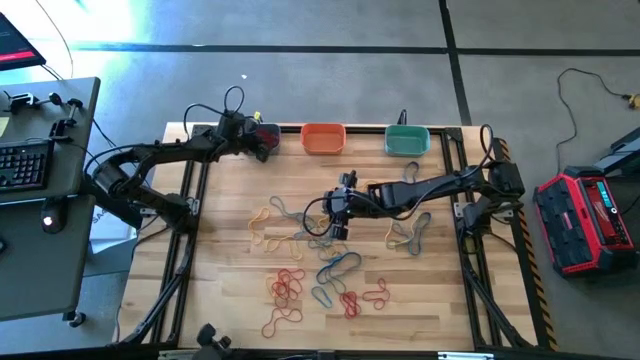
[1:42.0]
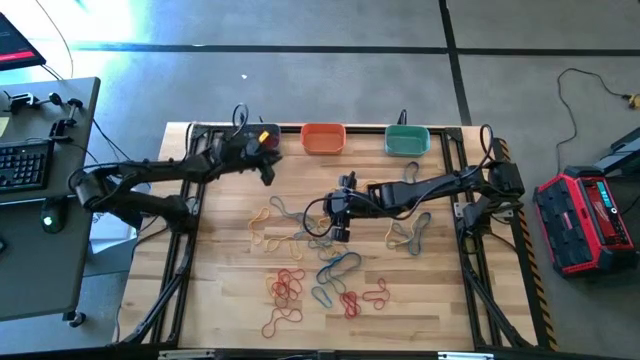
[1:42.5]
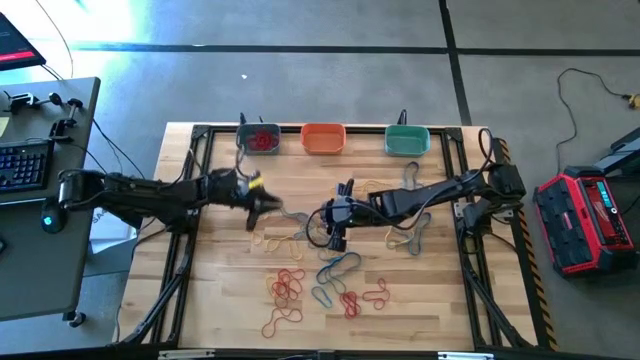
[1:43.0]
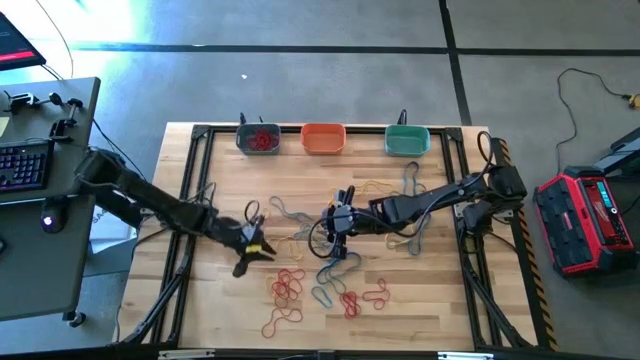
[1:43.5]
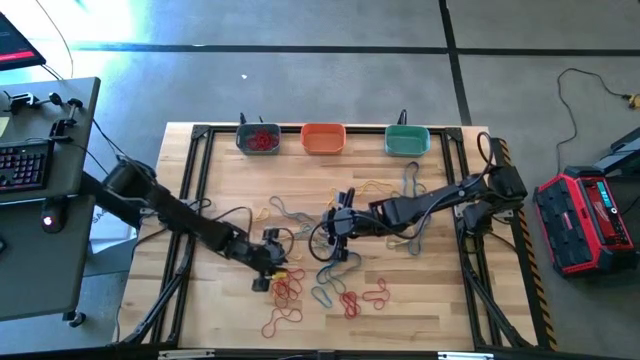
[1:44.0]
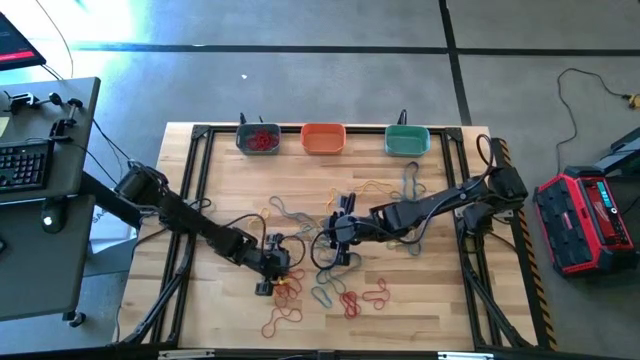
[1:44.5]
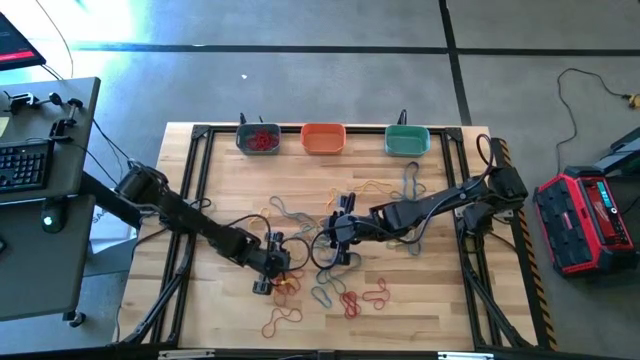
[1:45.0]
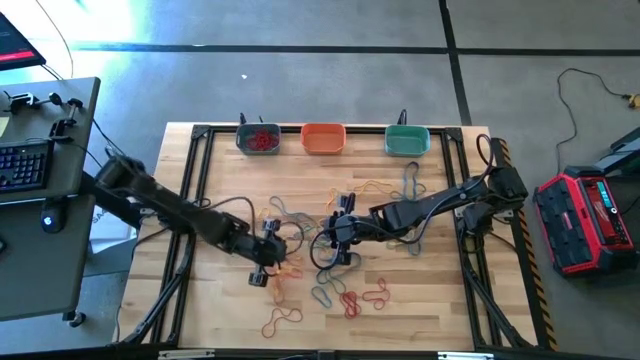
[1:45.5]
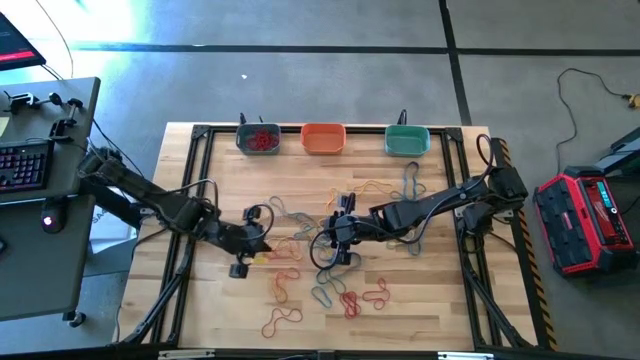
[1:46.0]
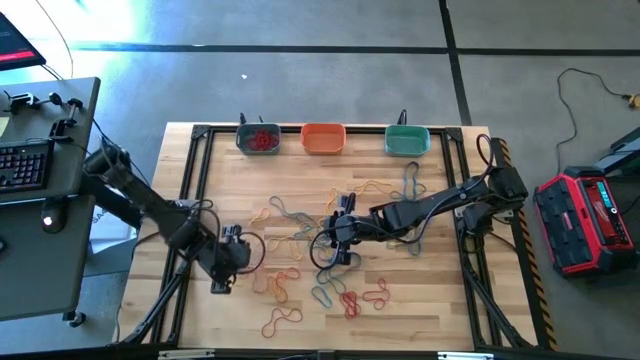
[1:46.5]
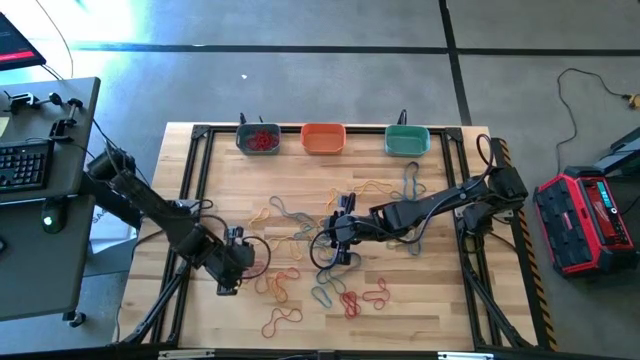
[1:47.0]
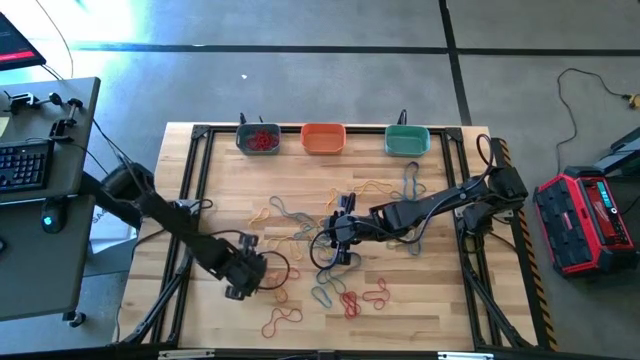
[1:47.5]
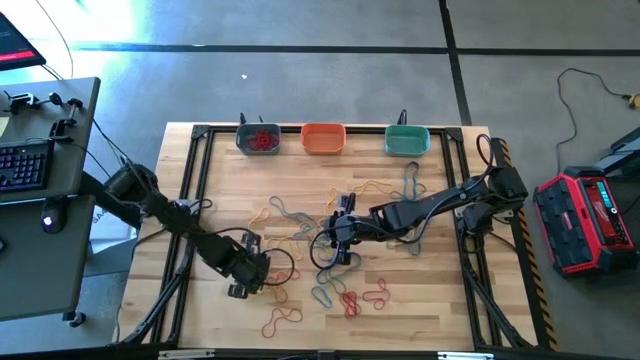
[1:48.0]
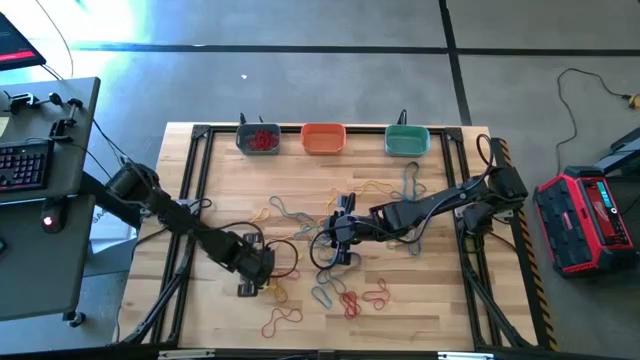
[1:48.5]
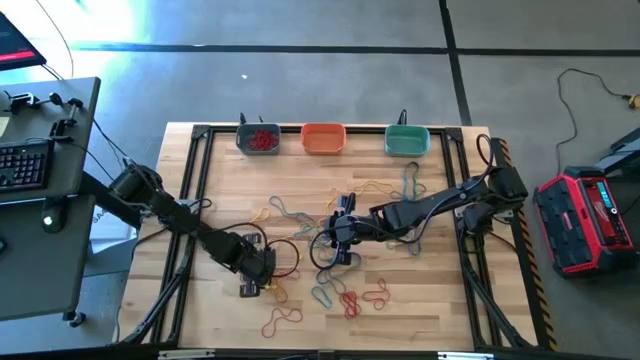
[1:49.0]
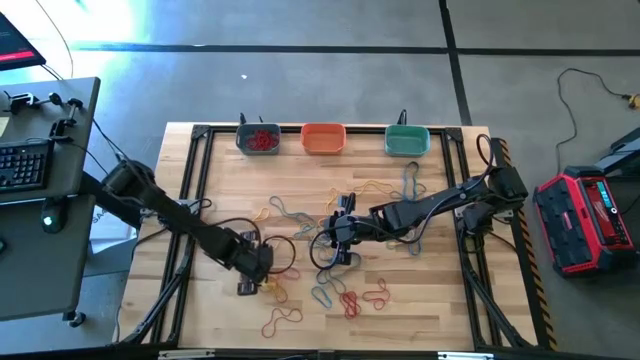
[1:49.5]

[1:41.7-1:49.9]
Task: Sort rubber bands into baskets
Put the red rubber band into the blue bin

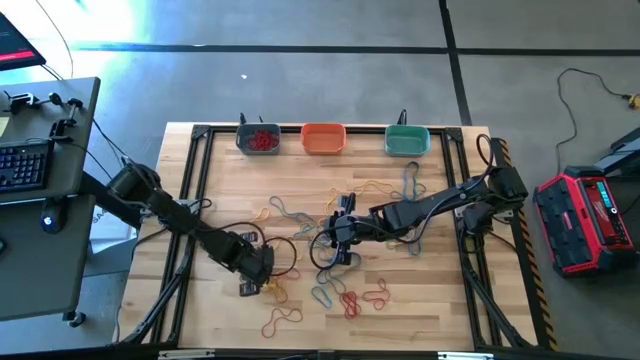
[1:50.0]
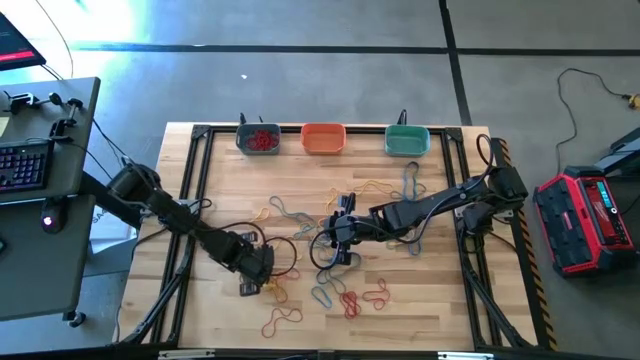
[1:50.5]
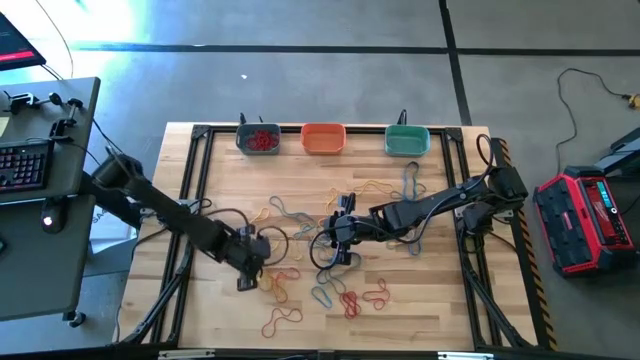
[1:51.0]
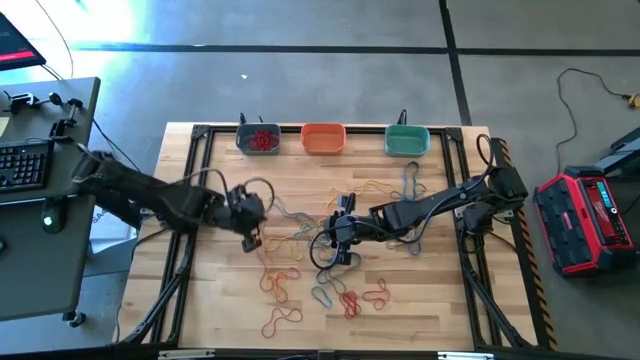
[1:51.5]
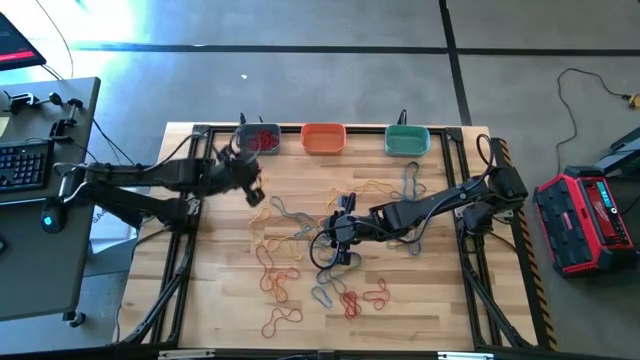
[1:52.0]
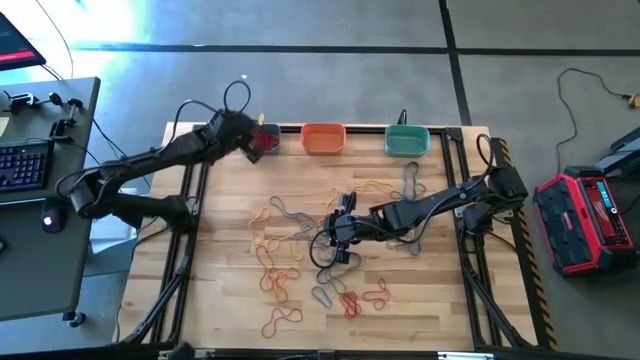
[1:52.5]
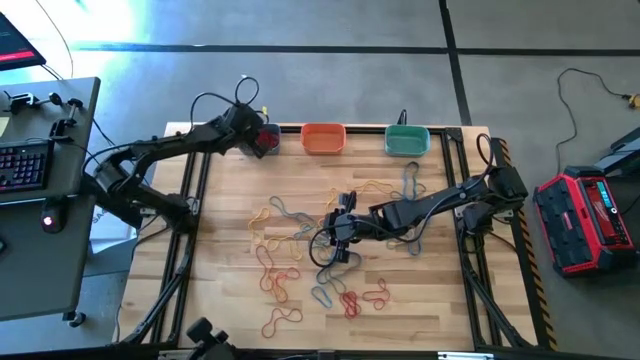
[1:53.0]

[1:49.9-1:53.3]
Put the red rubber band into the blue bin

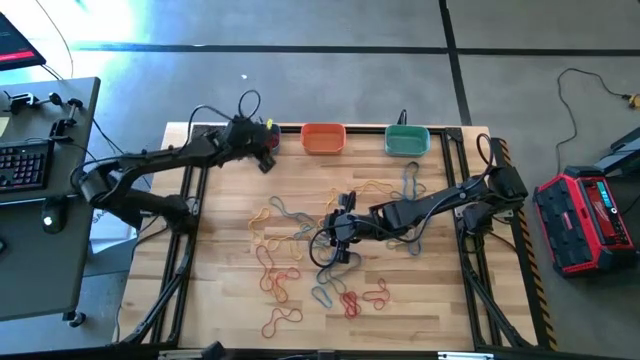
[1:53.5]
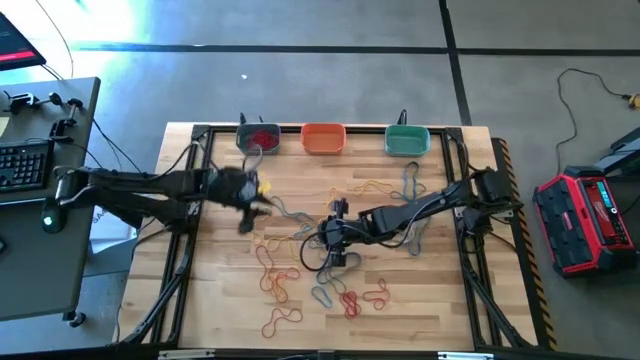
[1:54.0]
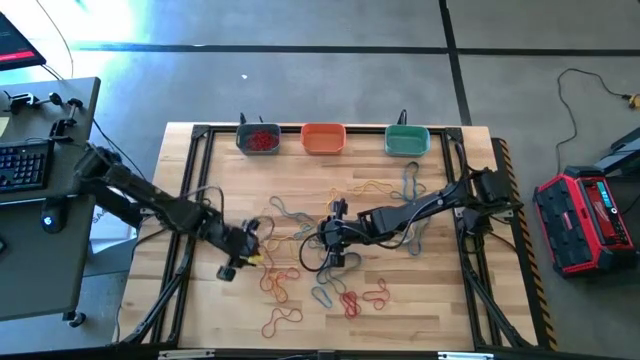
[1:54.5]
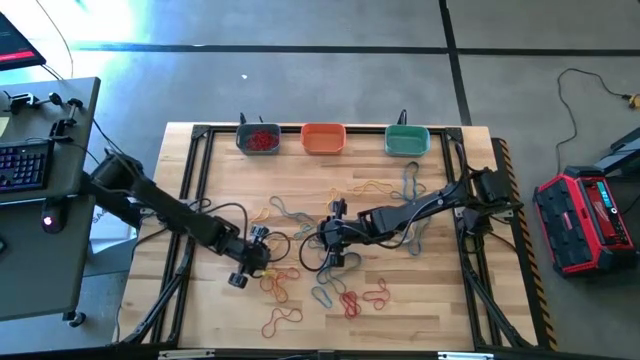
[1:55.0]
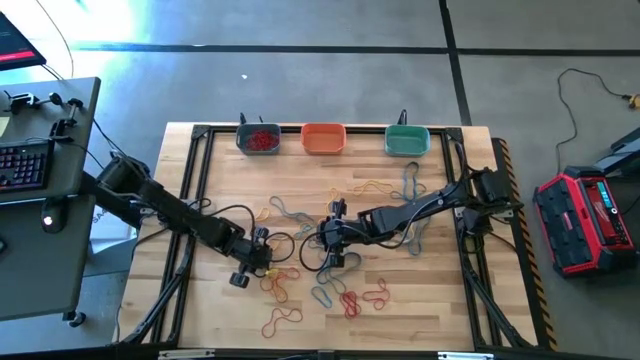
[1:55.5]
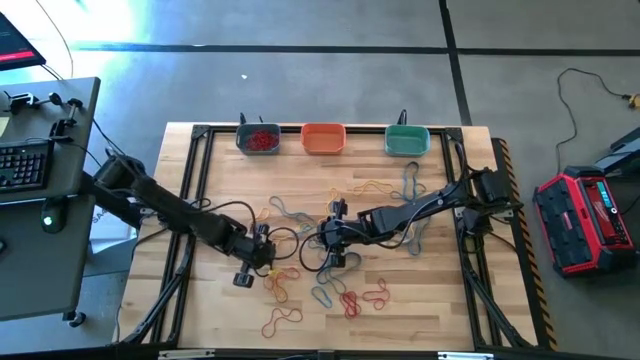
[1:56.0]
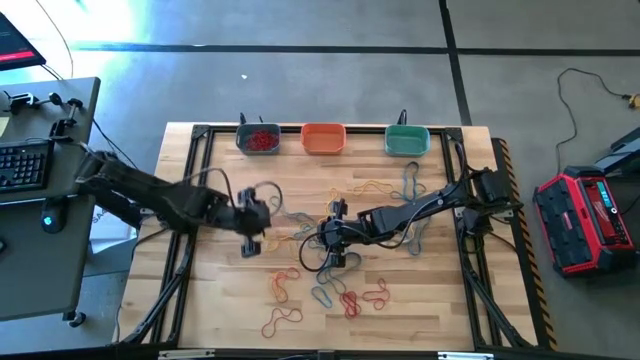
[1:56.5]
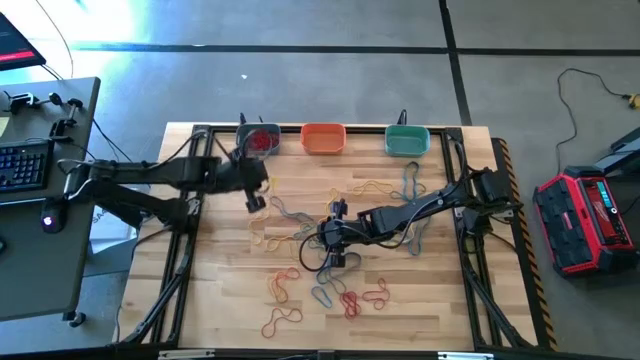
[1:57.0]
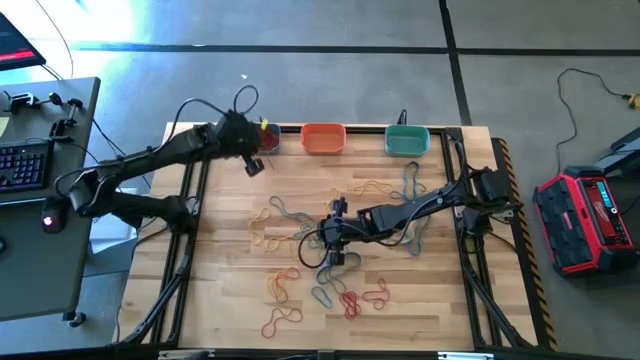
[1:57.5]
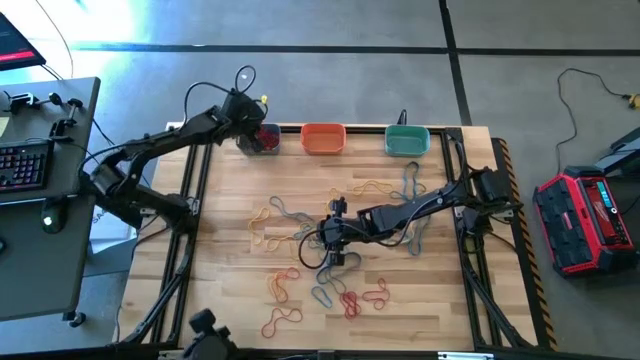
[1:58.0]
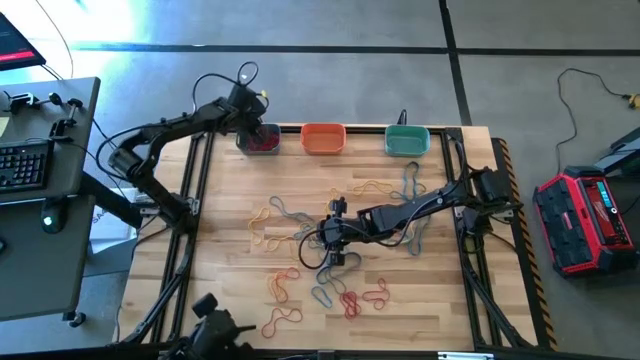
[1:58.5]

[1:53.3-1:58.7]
Put the red rubber band into the blue bin

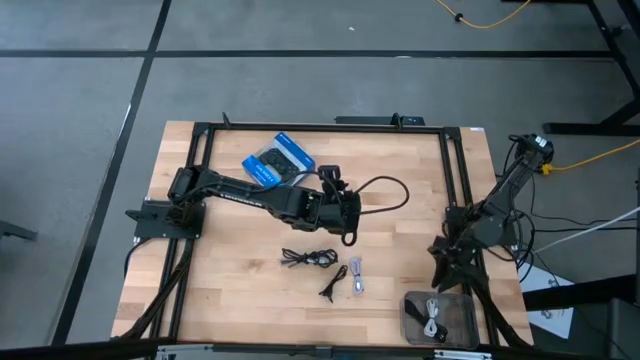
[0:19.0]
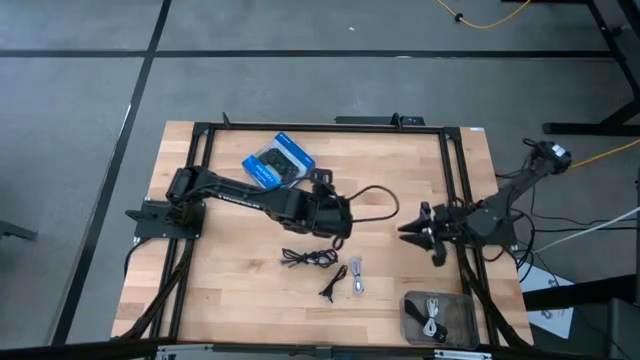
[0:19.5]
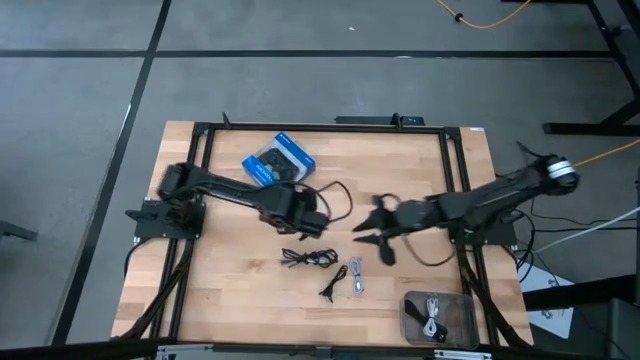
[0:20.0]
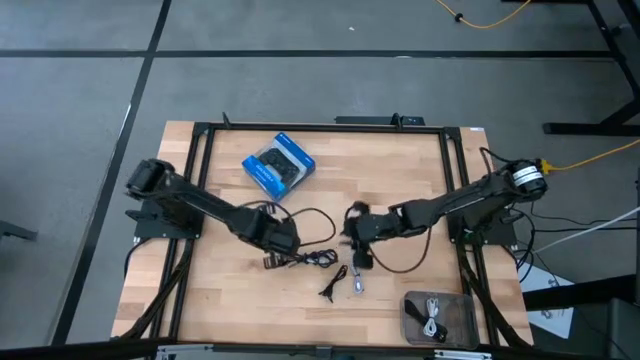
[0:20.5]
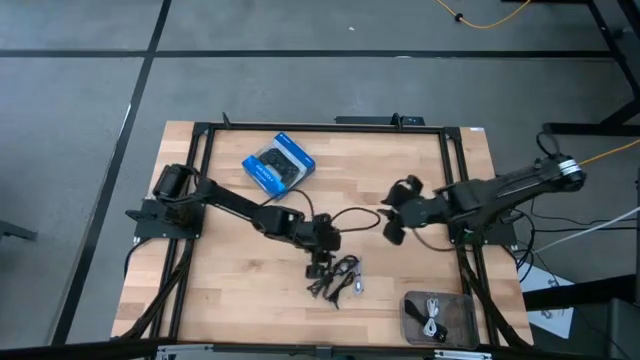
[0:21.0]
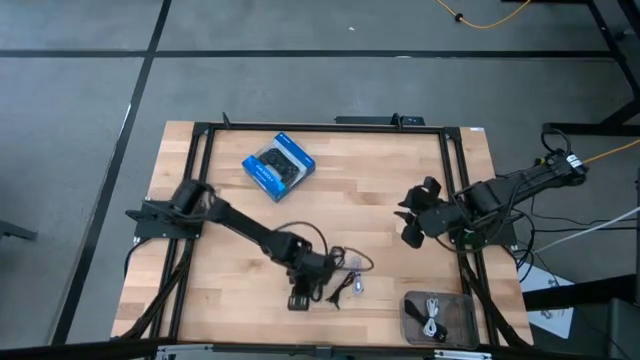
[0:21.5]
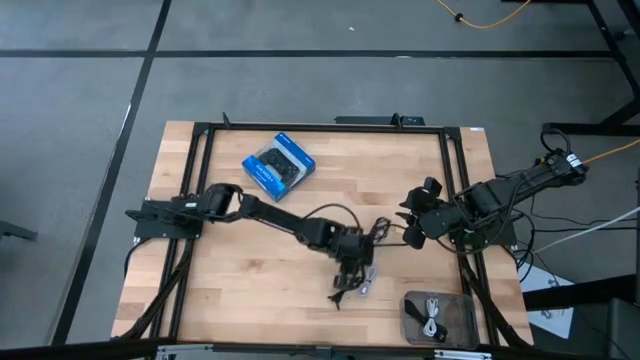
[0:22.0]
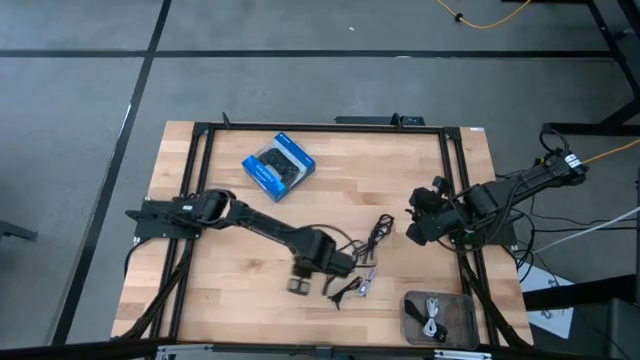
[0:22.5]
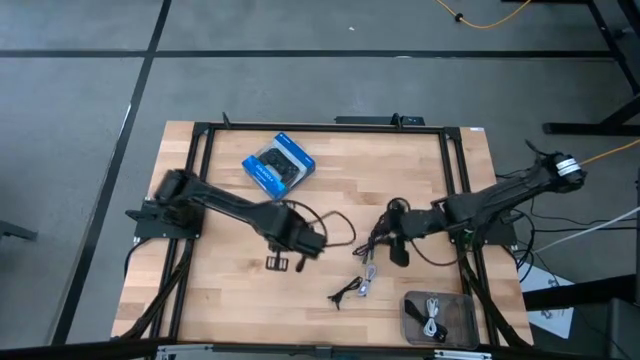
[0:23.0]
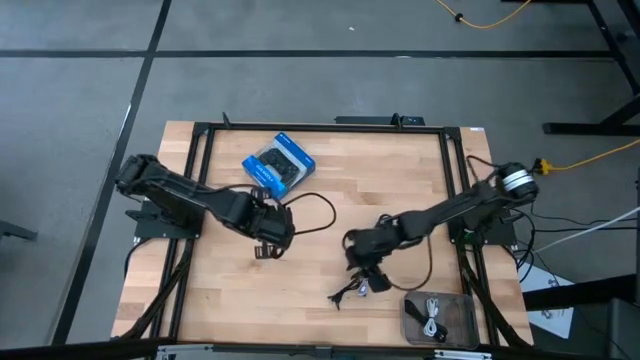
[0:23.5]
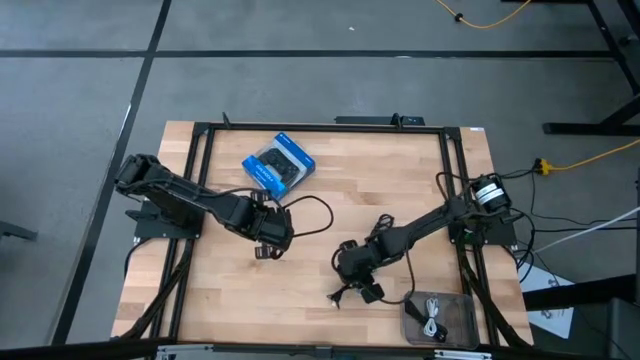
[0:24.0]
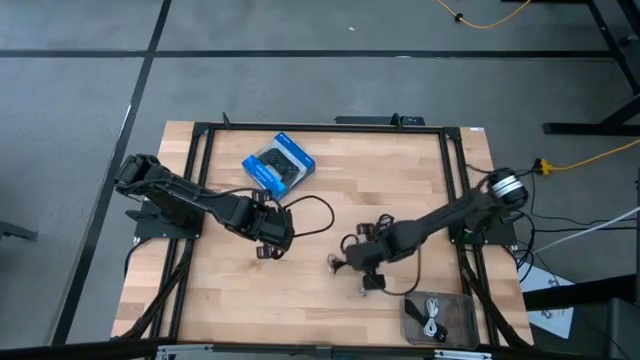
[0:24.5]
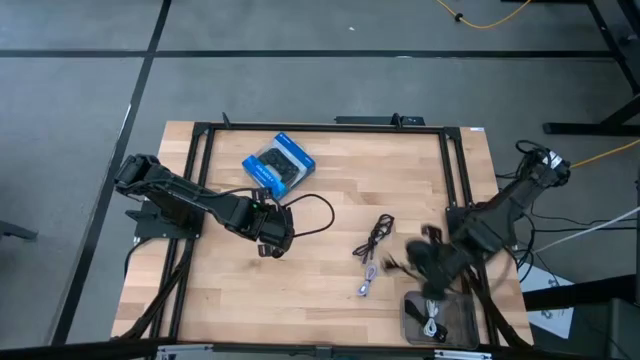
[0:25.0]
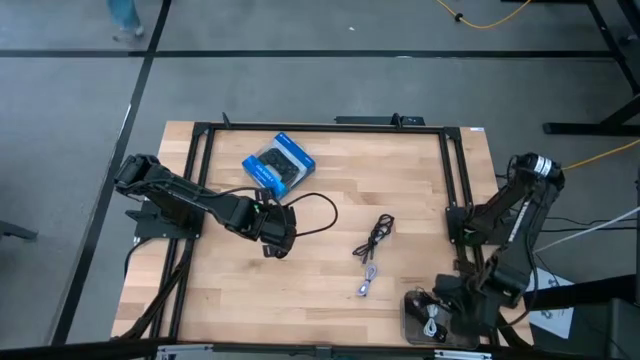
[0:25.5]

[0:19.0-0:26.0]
Task: Pick and place USB-C Cables
Put the bottom black charger cable into the black bin
